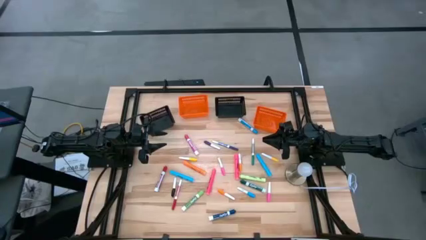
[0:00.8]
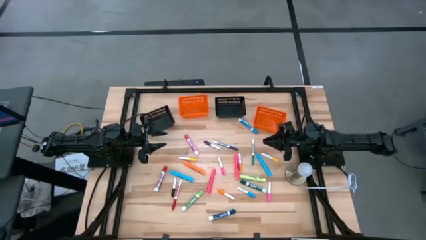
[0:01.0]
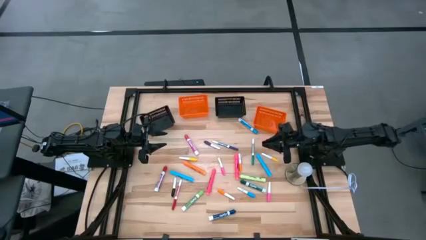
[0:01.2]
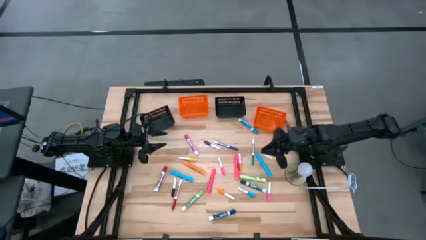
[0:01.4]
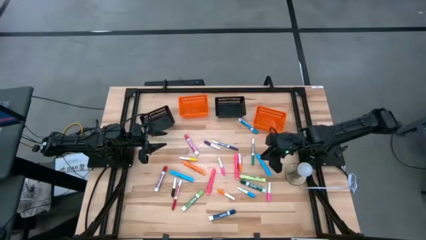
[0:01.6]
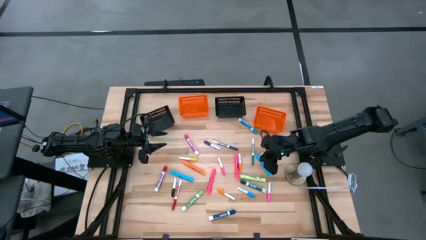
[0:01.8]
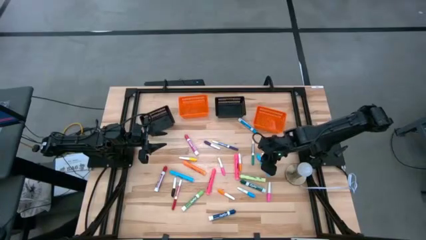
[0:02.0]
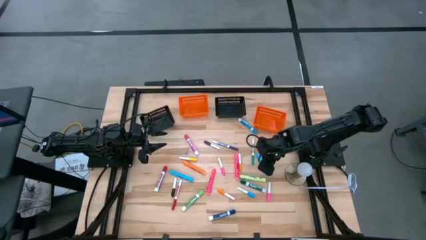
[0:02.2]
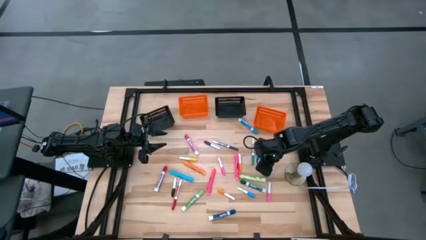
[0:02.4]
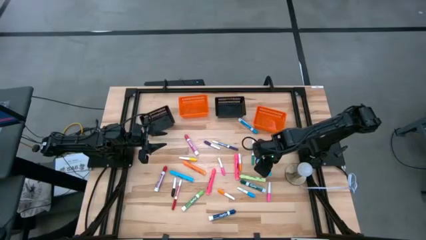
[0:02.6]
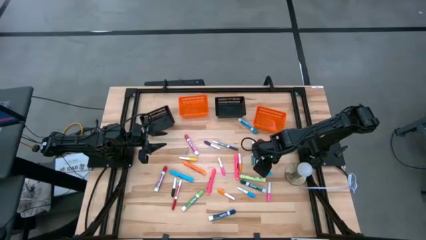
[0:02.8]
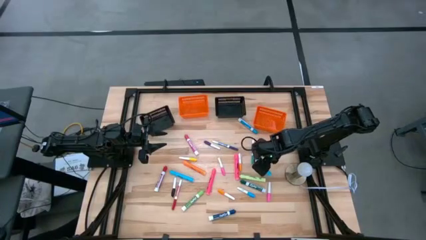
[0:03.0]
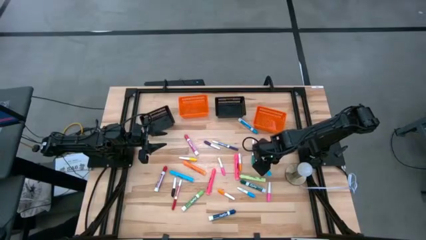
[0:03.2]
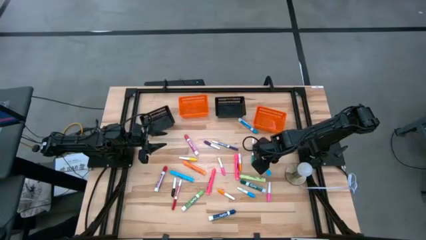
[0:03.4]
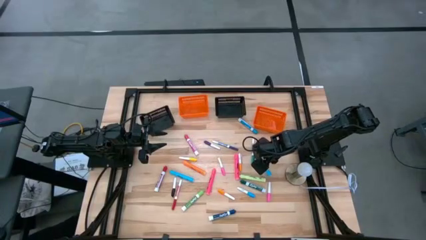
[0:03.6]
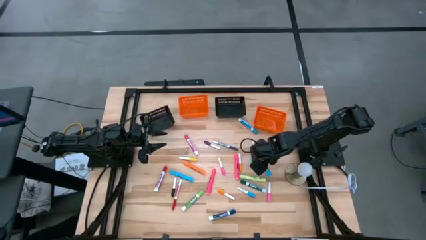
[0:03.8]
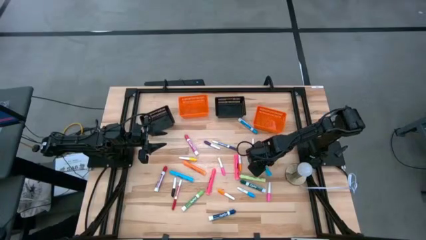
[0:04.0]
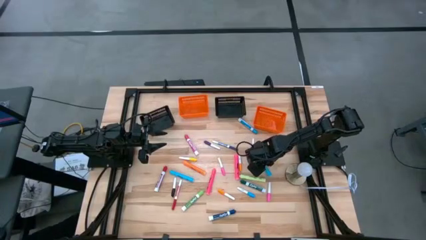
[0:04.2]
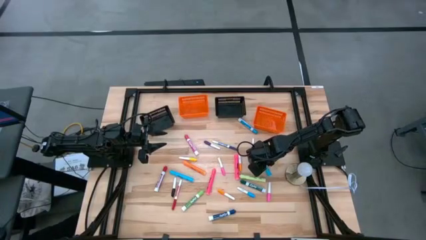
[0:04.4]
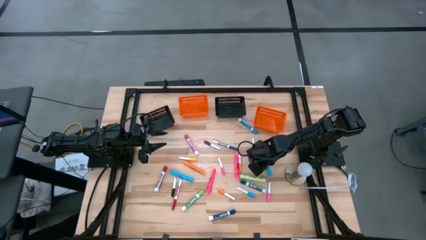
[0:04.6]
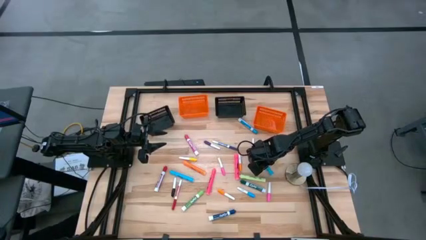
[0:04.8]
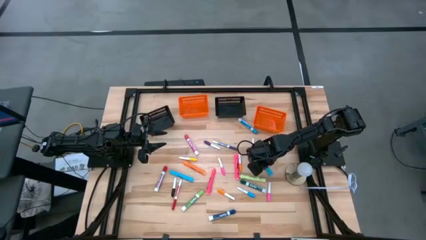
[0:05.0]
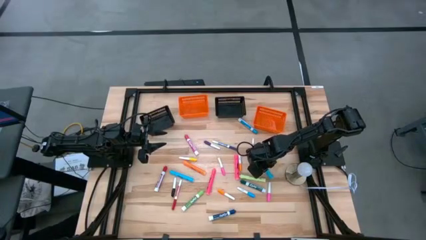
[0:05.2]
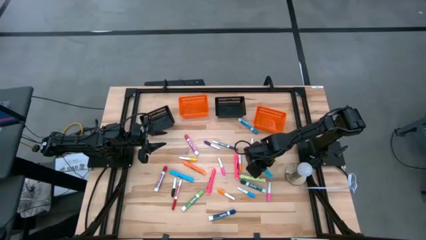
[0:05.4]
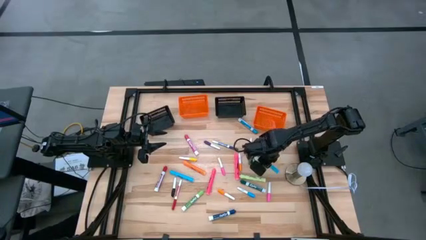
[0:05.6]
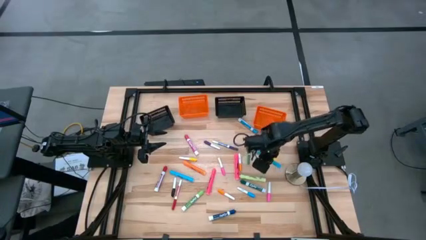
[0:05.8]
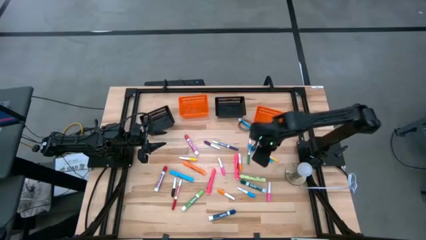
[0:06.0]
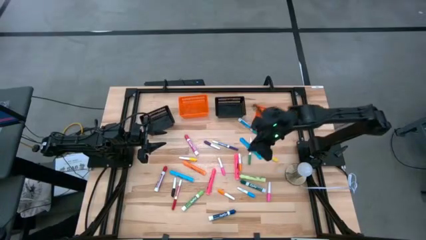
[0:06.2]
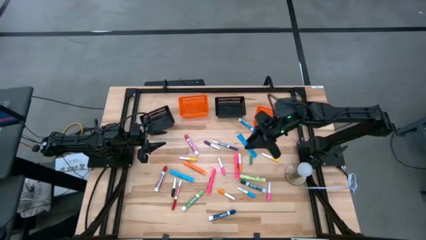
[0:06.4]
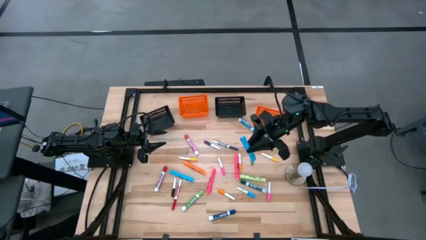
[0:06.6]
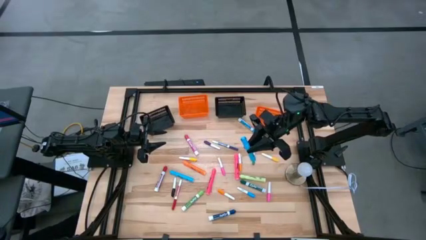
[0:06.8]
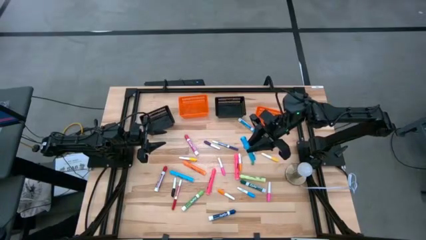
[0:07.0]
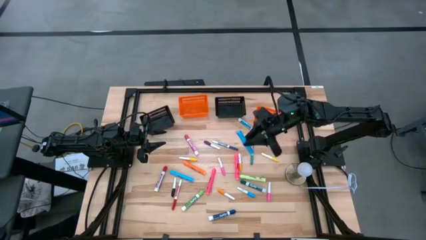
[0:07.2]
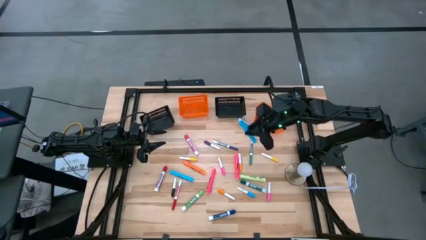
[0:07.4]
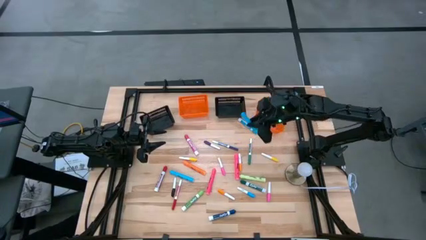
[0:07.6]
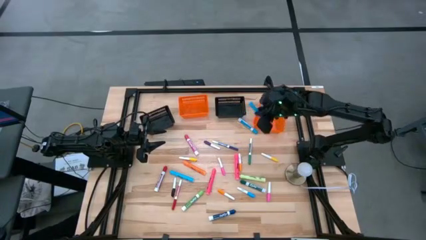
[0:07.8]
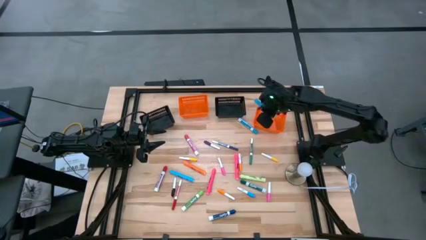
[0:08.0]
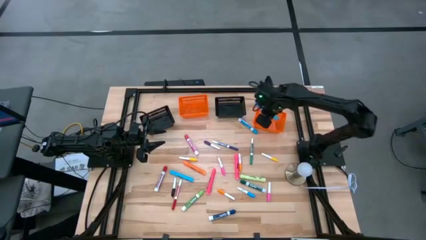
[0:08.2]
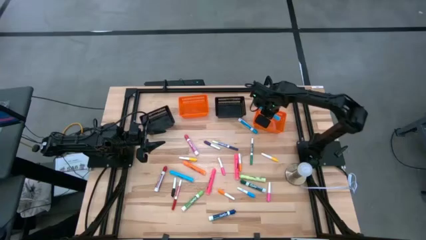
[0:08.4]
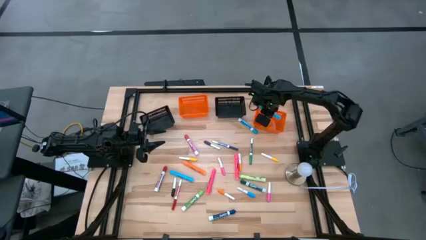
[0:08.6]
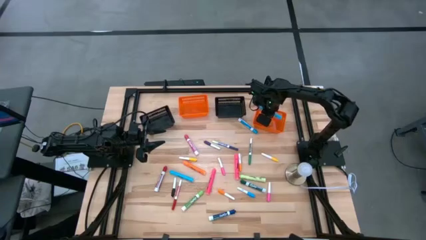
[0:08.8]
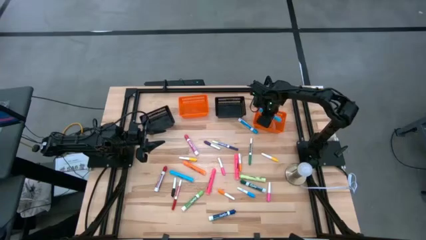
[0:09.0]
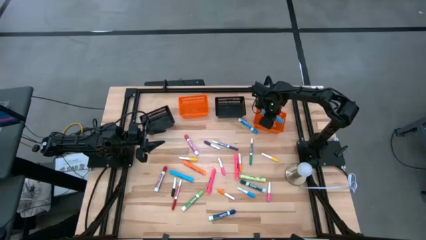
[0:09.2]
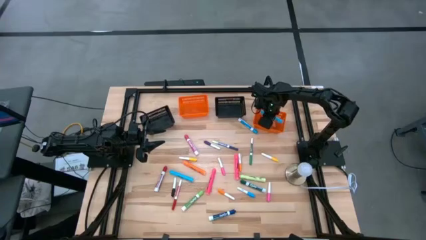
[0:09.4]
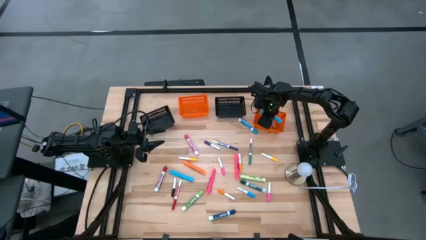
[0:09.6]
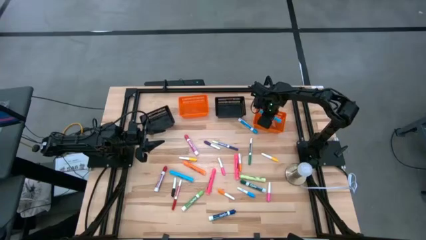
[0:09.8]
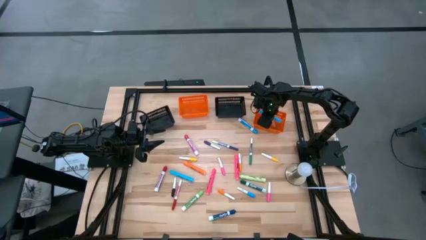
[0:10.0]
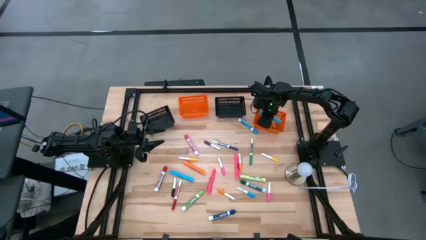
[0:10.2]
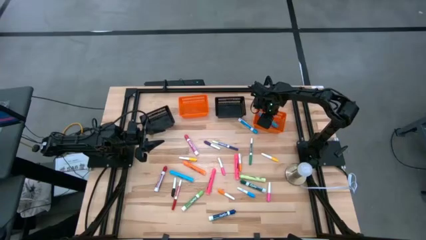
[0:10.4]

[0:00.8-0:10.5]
Task: Pick & Place Markers
Put the right blue marker into the right orange bin

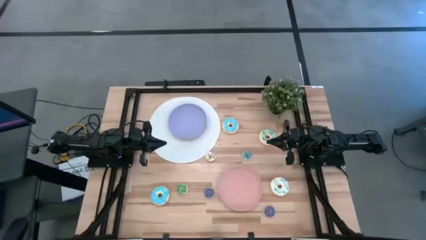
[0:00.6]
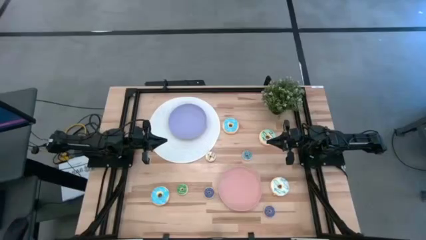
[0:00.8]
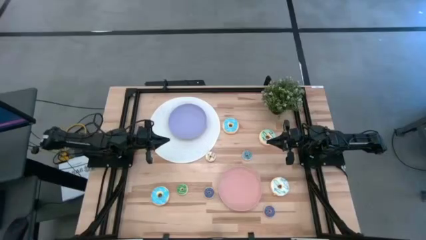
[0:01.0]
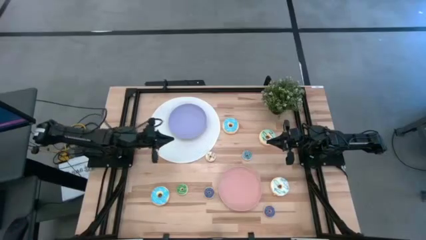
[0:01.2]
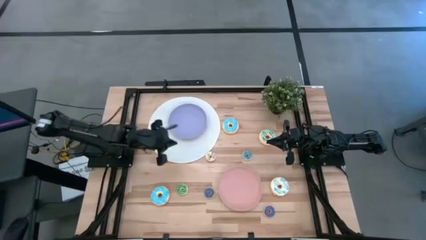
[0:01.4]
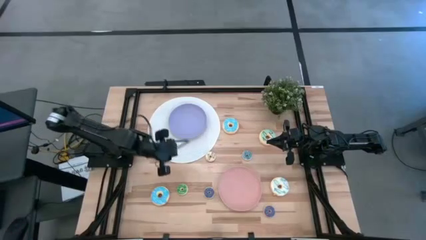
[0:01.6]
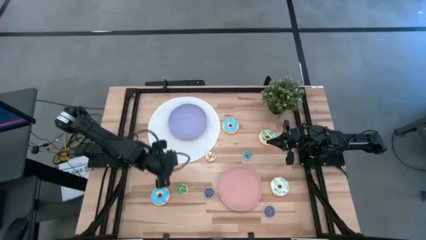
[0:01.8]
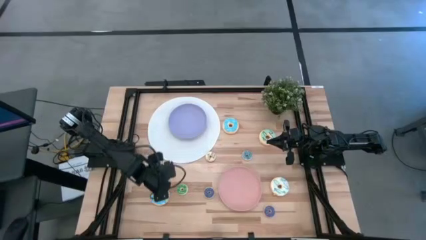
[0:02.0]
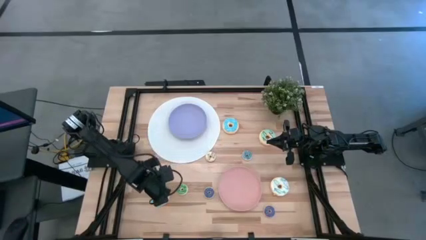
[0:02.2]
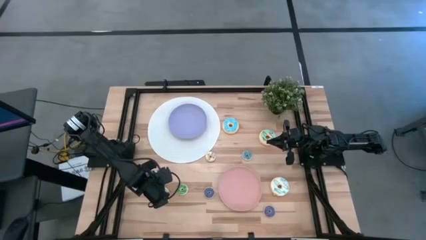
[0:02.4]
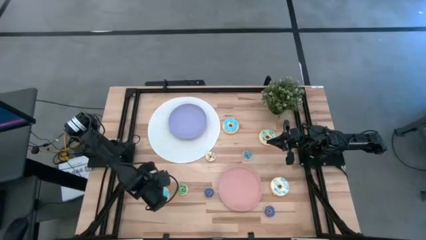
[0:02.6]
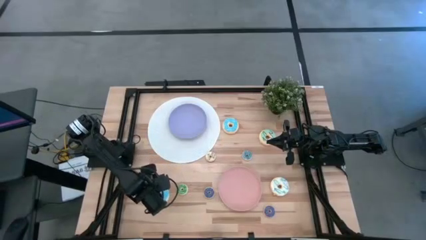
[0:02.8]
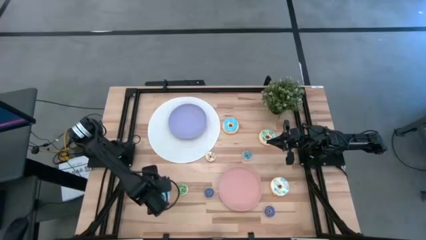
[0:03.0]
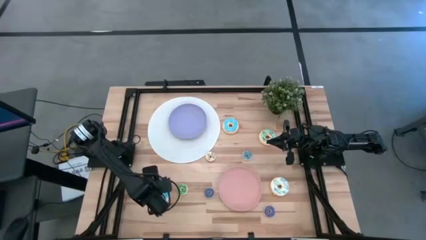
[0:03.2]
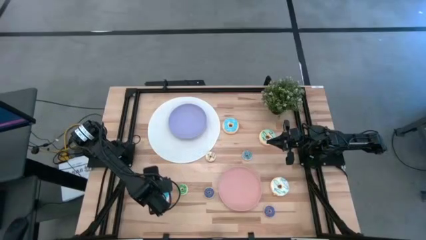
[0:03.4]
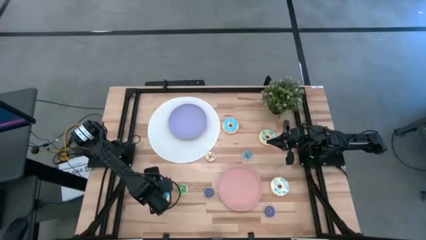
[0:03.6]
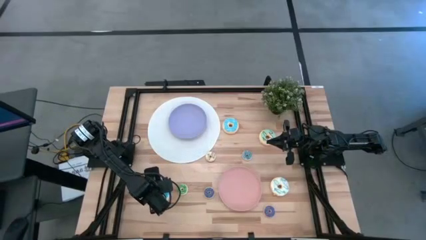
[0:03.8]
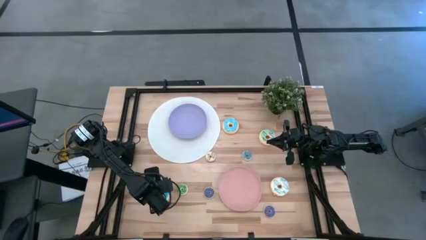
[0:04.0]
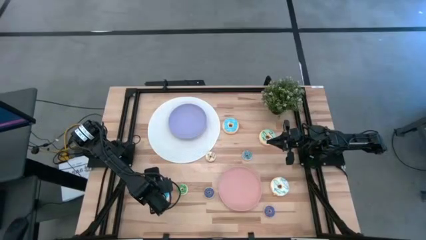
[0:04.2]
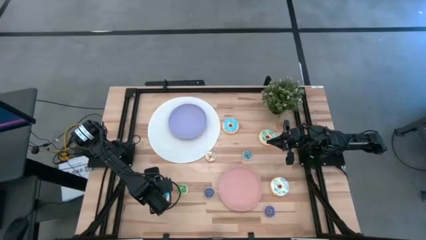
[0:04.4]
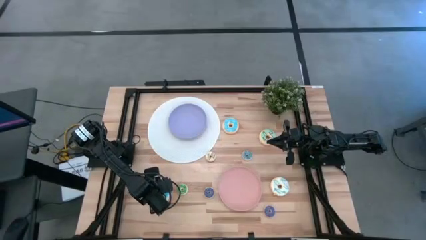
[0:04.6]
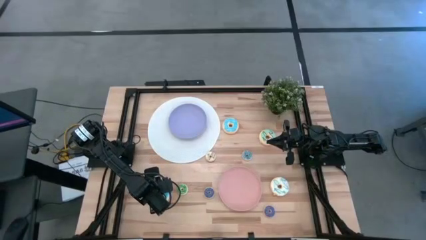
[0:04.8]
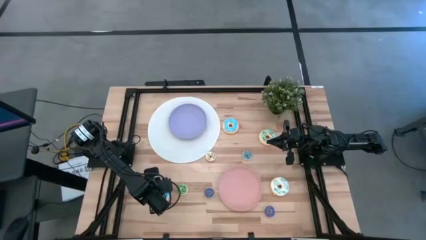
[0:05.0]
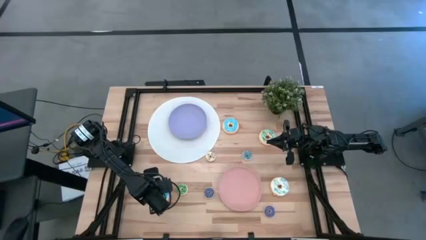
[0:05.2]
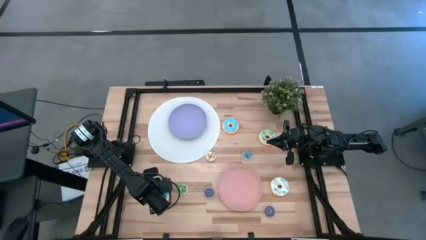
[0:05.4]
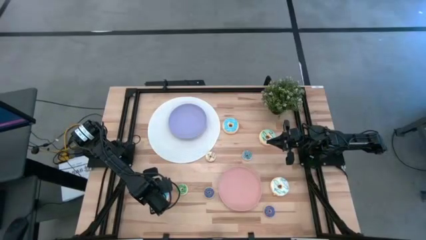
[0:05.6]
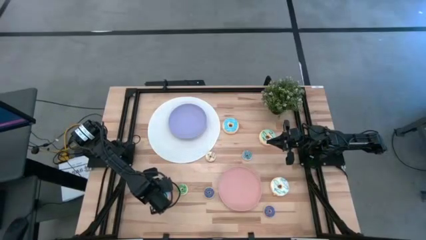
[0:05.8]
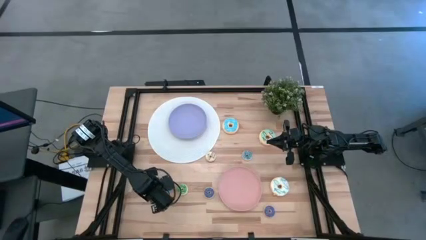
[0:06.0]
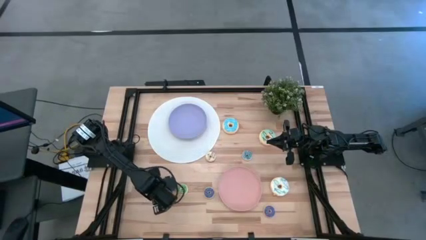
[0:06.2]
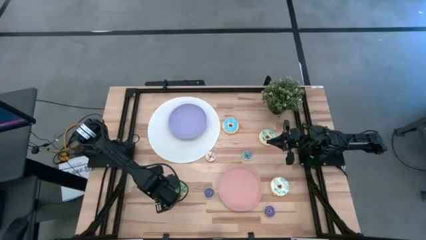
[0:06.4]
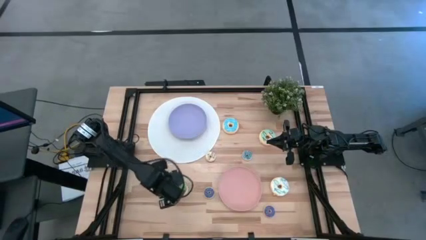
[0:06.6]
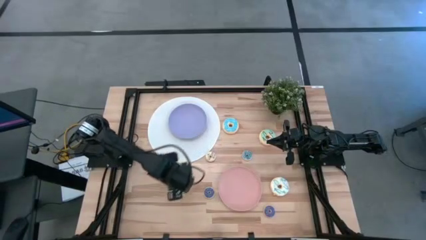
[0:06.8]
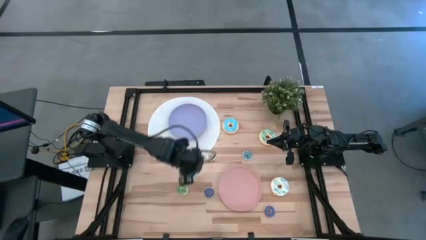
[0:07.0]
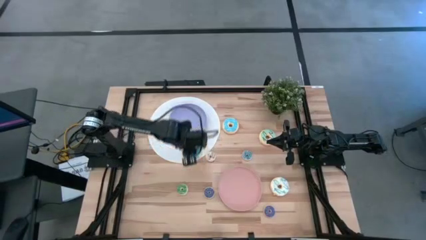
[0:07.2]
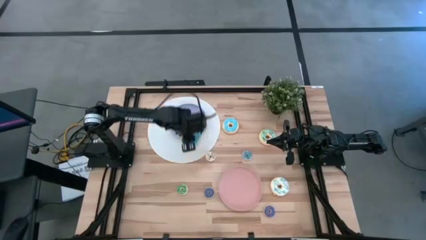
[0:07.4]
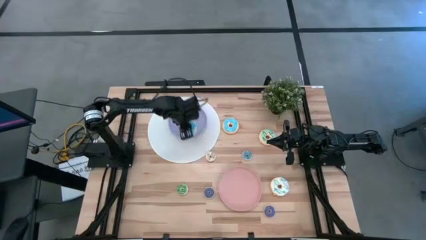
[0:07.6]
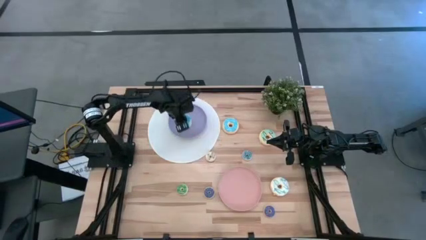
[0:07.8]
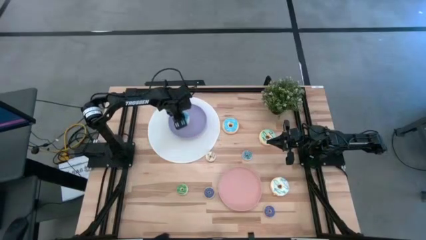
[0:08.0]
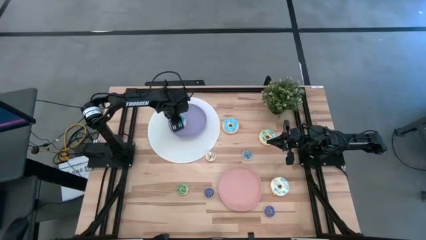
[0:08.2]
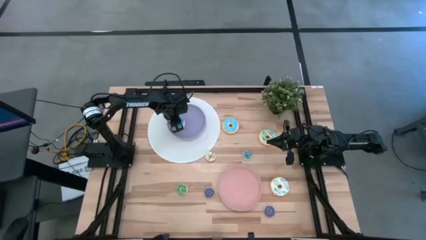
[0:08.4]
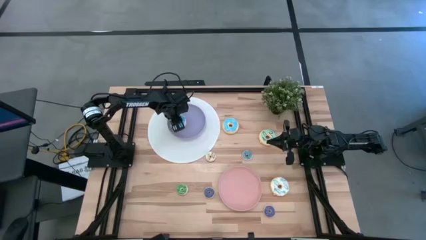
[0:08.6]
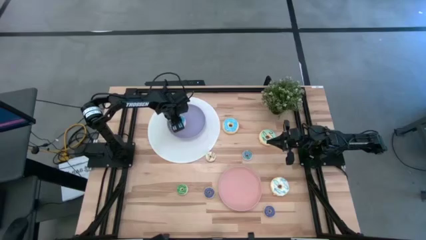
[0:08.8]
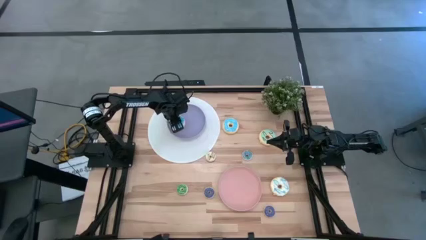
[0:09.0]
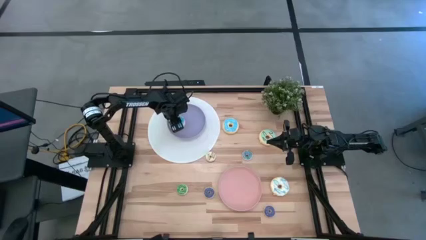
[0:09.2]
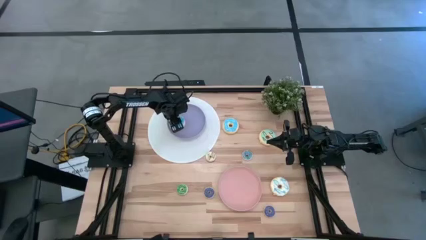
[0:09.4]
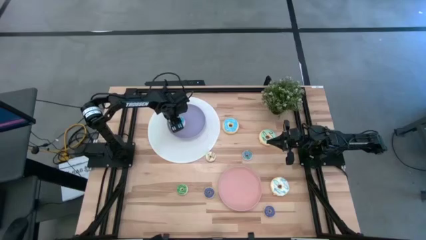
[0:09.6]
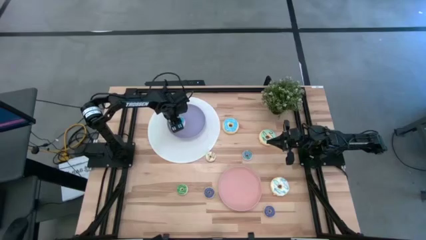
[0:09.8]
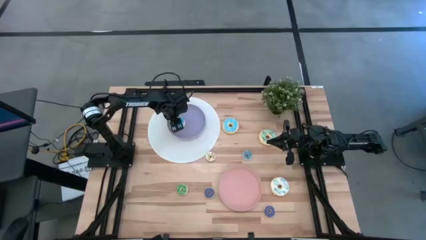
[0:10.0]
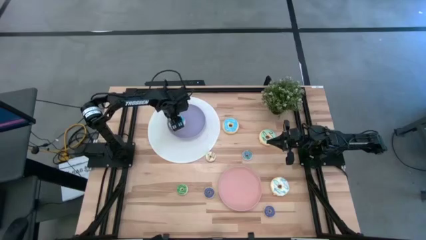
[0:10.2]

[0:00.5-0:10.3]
Task: Pick & Place donuts
Put the big light blue donut on the purple plate
